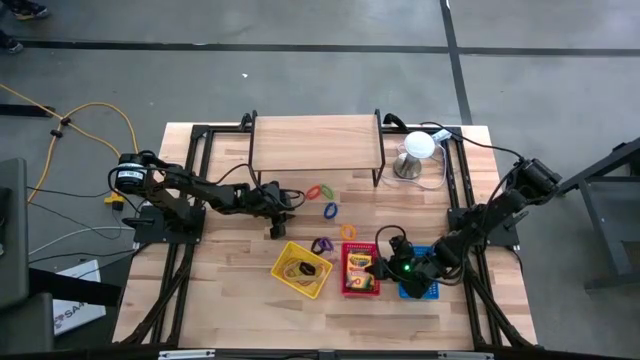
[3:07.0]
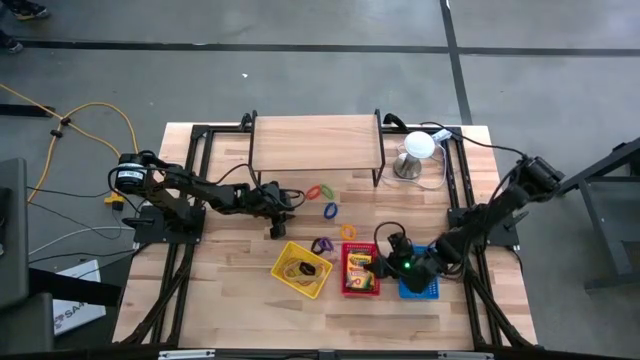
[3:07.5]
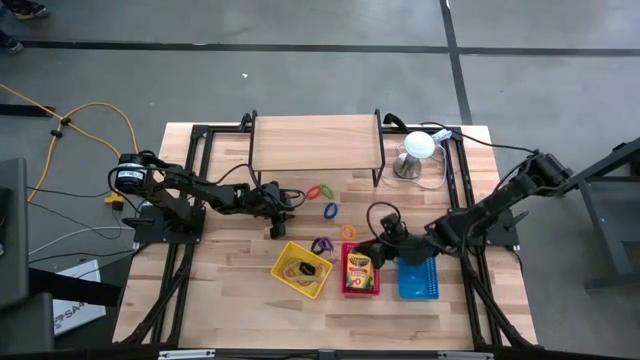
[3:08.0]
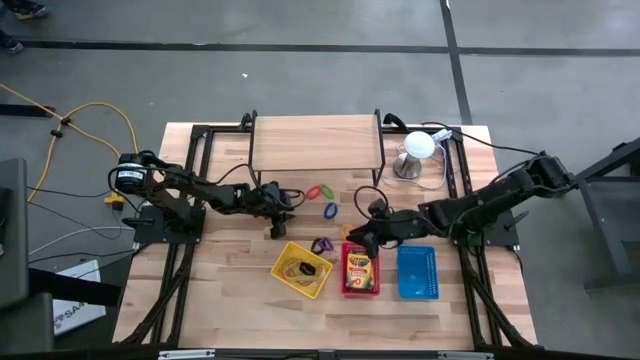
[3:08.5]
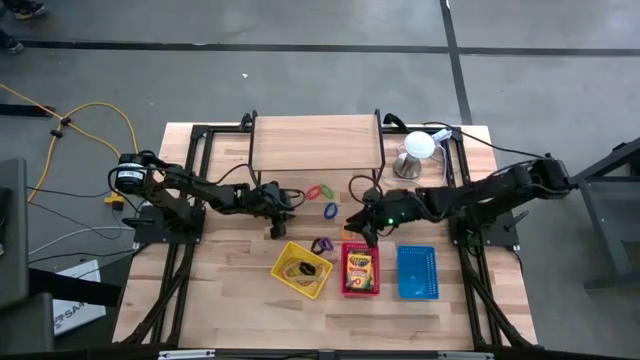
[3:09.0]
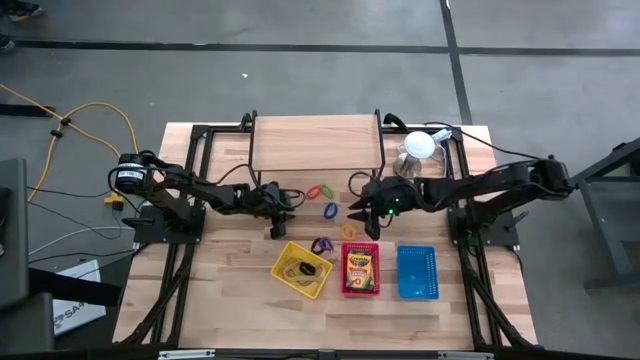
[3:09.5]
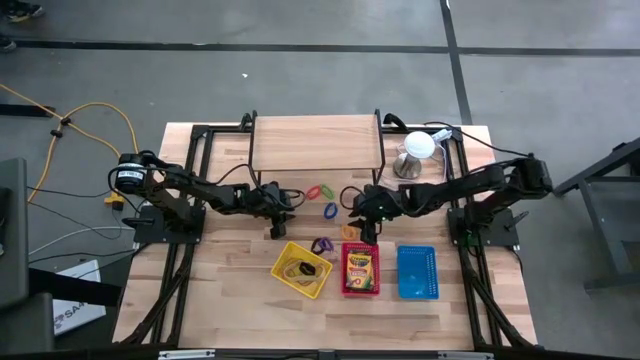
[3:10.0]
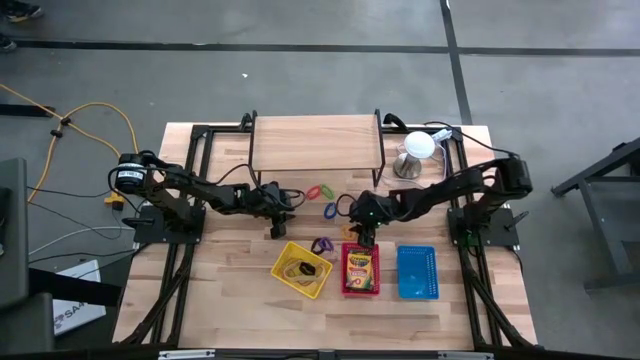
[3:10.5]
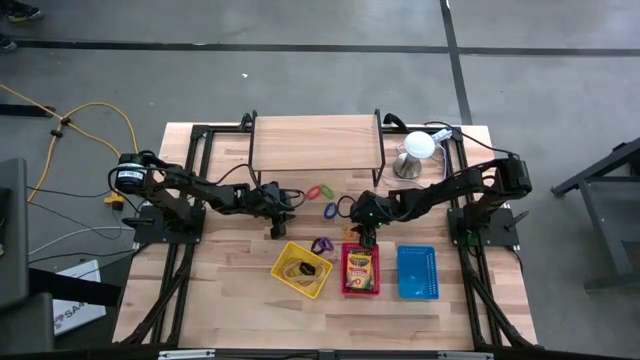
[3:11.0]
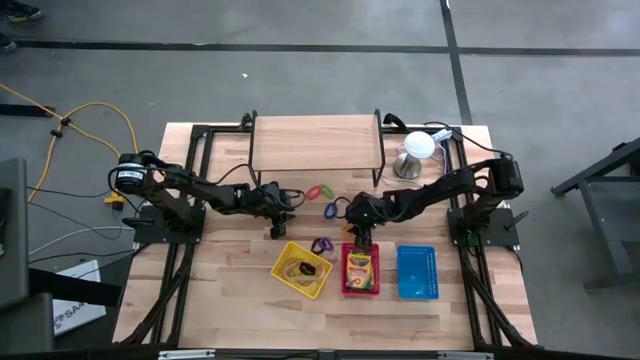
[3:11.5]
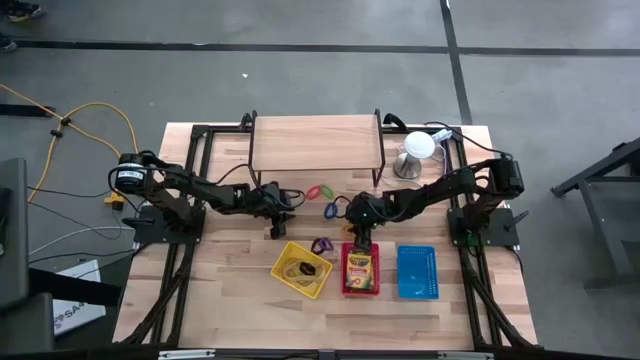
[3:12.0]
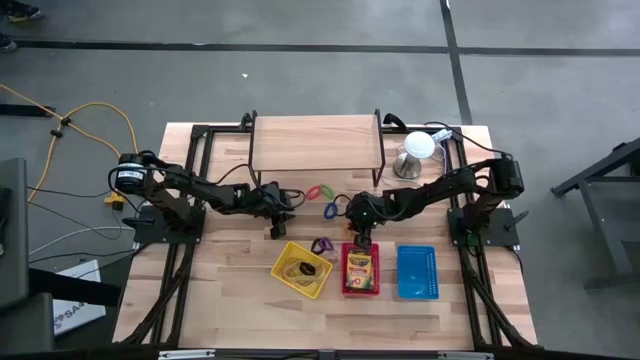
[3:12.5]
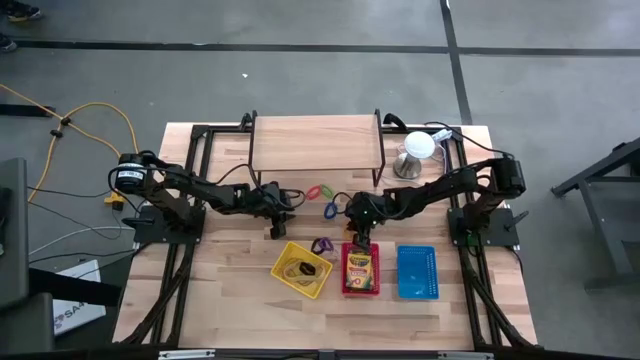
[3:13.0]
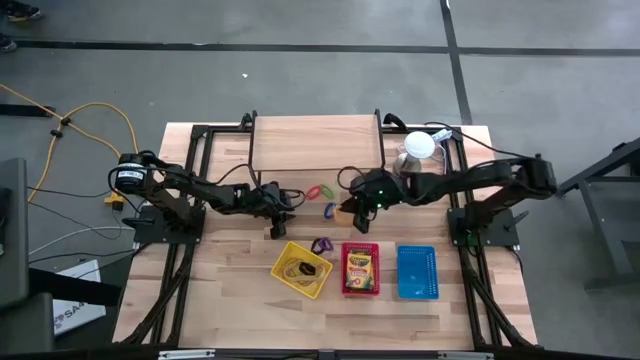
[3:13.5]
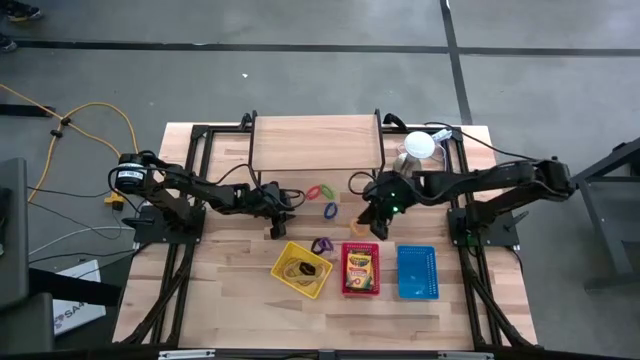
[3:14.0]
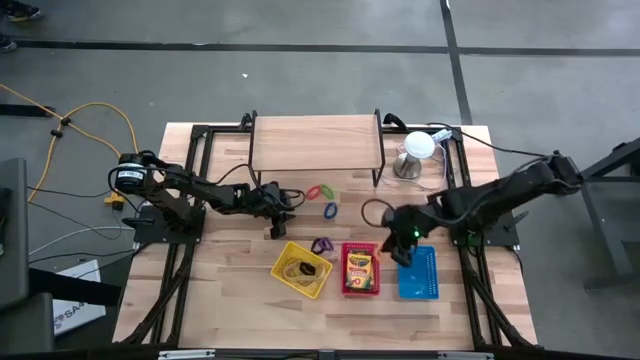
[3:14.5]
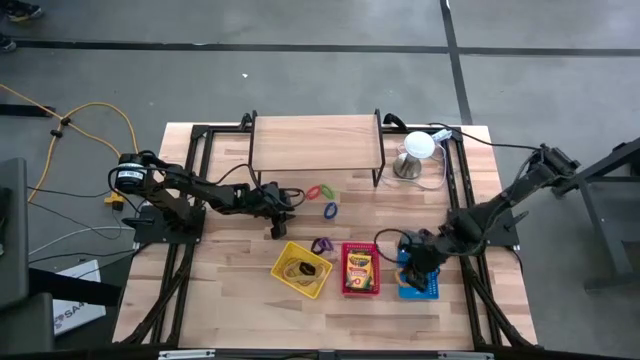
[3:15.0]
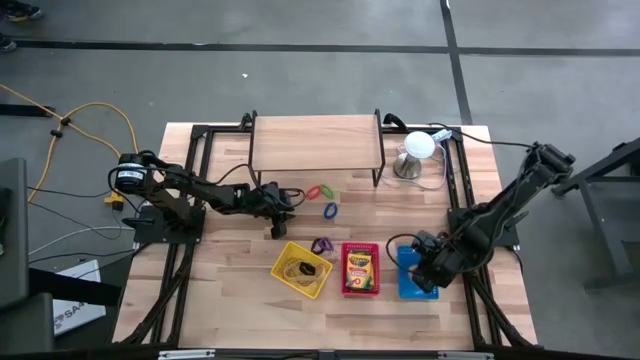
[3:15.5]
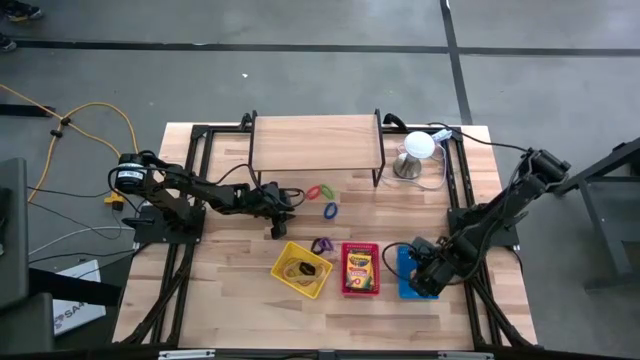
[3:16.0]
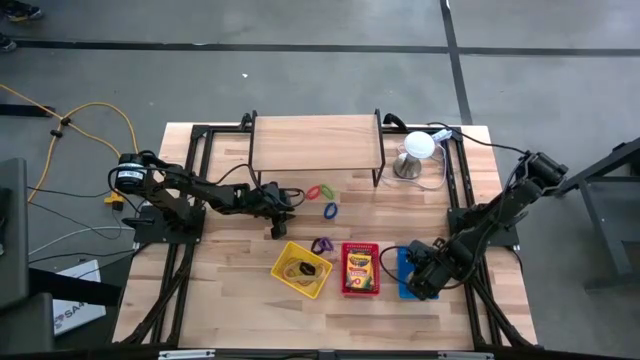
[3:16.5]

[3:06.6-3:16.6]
Task: Pick & Place Office Desk Supplies
Put the yellow spring keychain into the blue bin

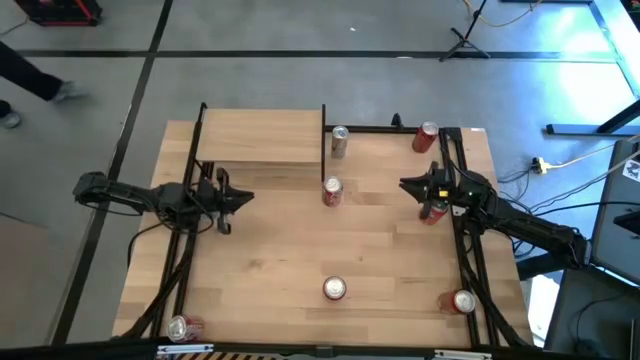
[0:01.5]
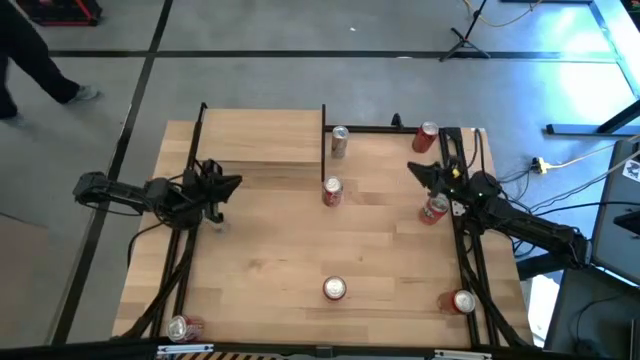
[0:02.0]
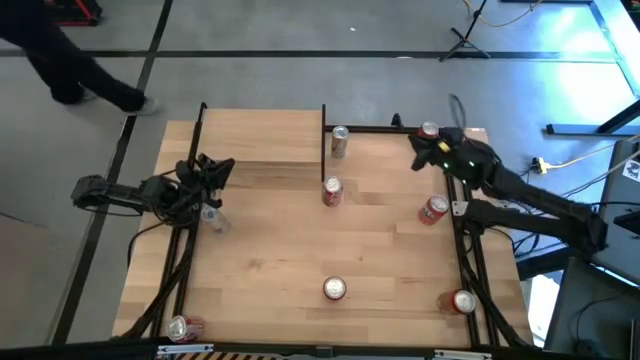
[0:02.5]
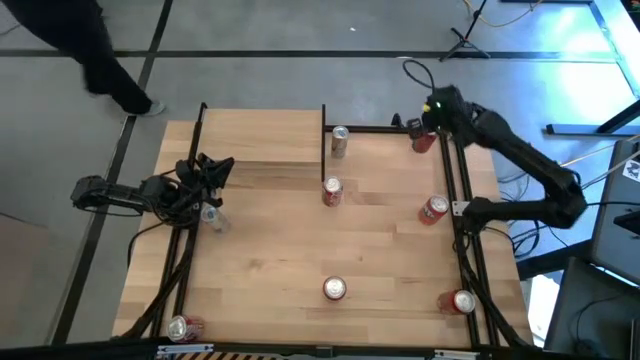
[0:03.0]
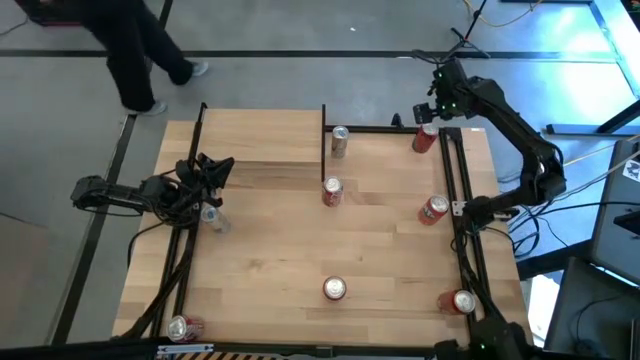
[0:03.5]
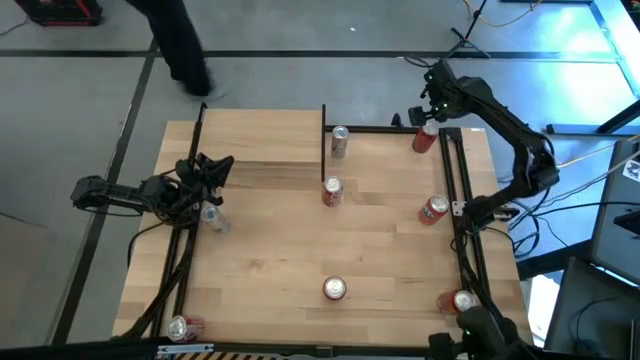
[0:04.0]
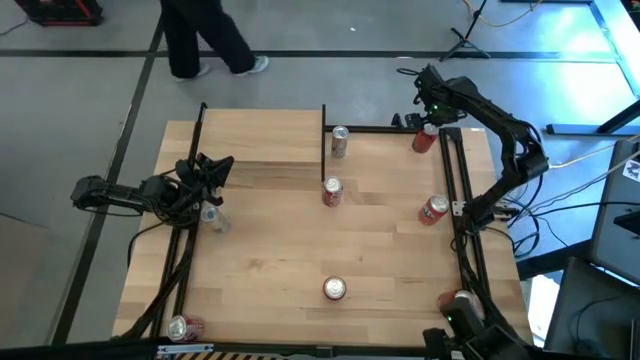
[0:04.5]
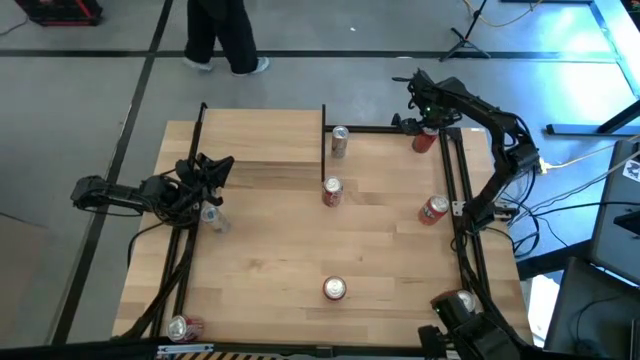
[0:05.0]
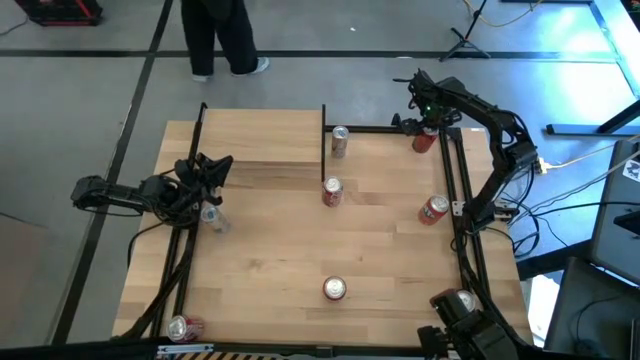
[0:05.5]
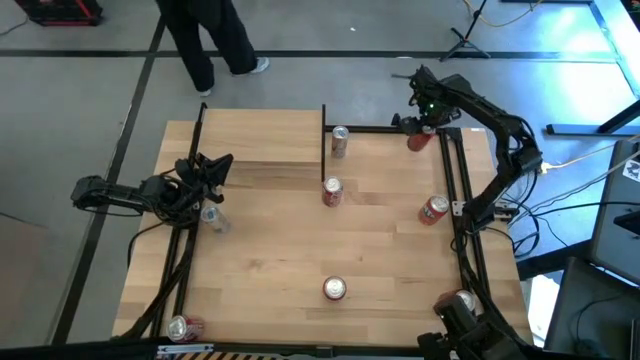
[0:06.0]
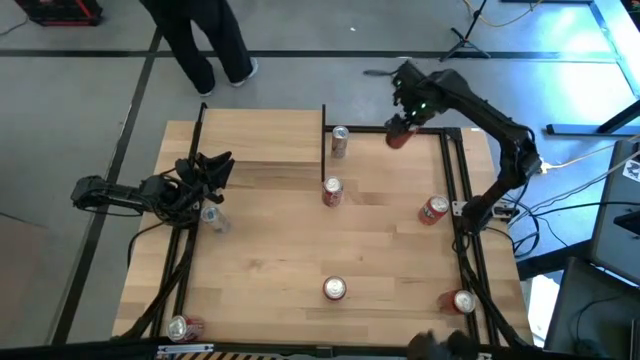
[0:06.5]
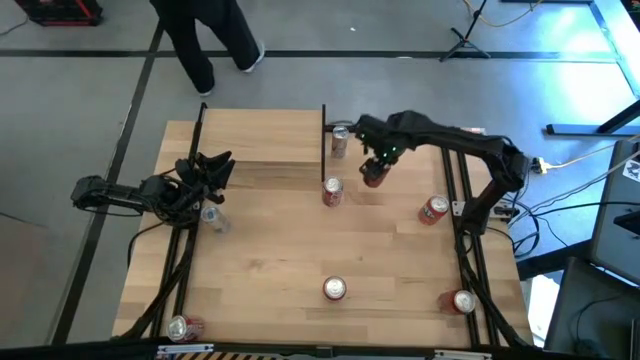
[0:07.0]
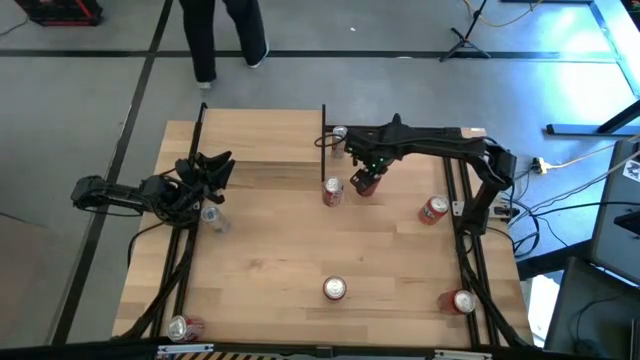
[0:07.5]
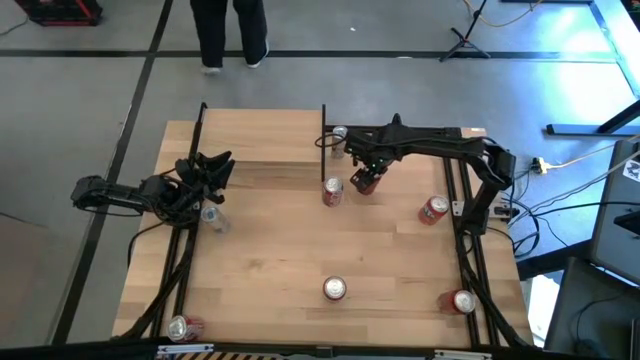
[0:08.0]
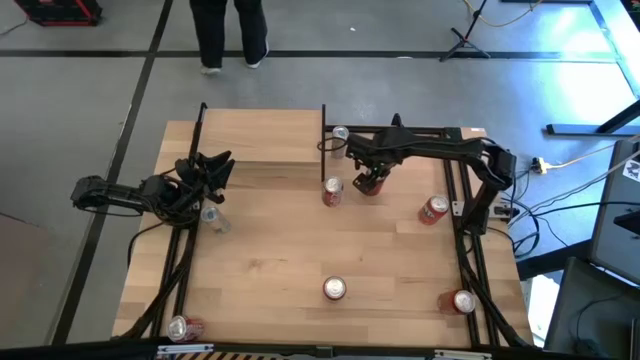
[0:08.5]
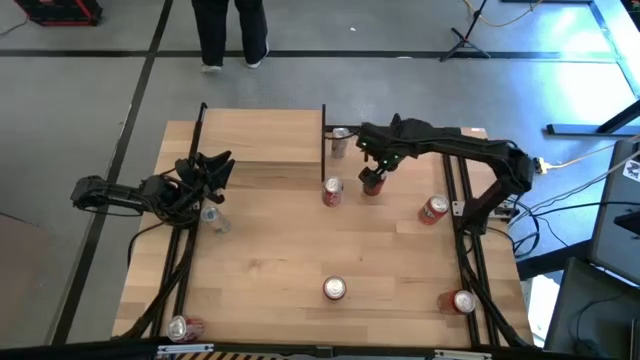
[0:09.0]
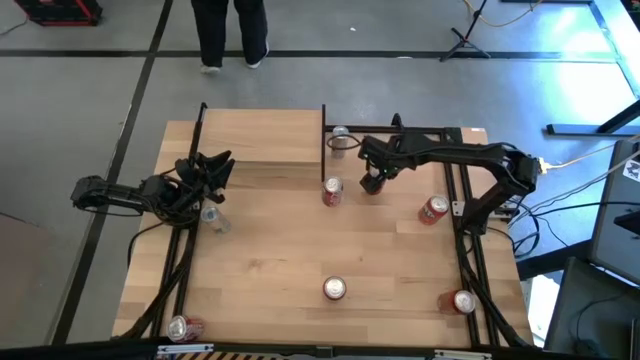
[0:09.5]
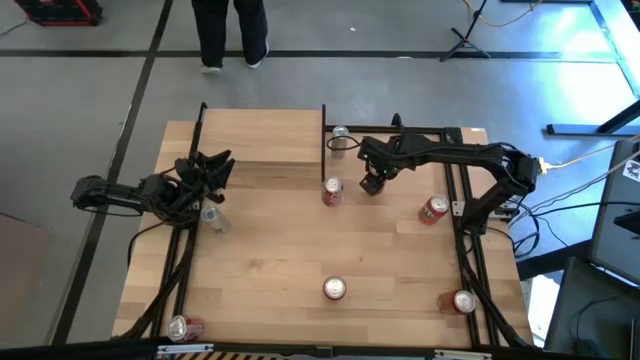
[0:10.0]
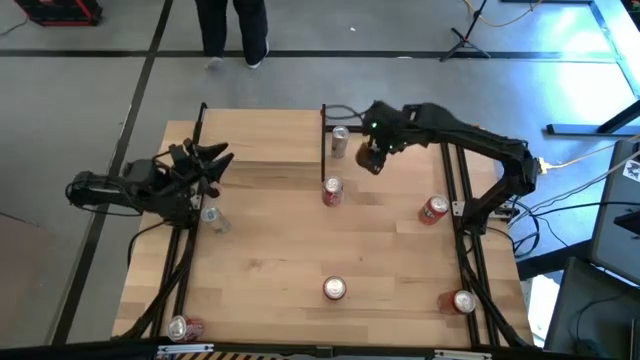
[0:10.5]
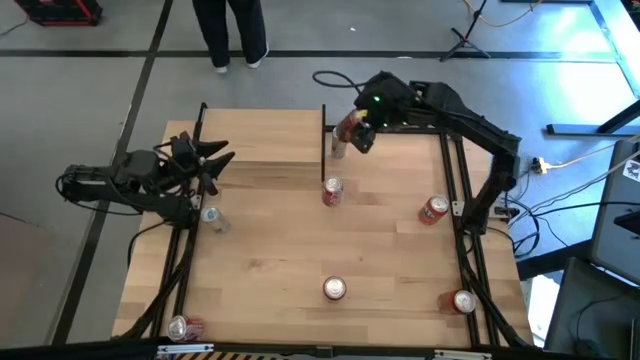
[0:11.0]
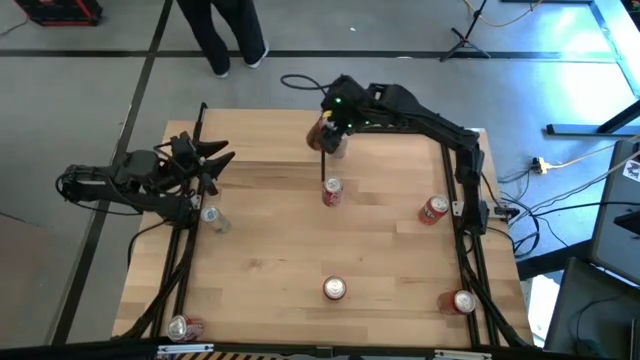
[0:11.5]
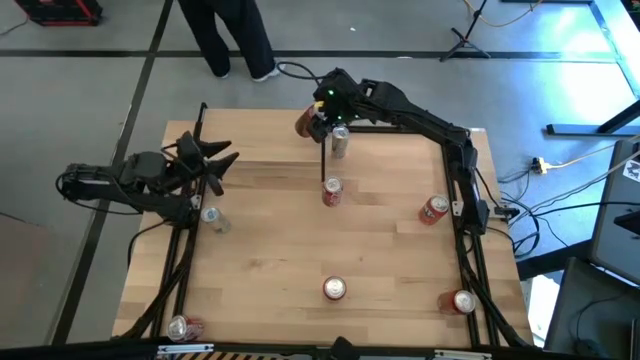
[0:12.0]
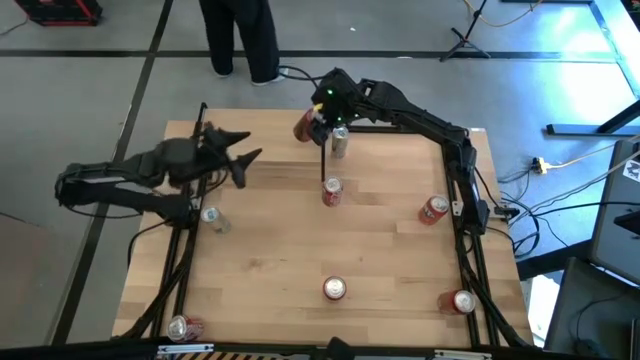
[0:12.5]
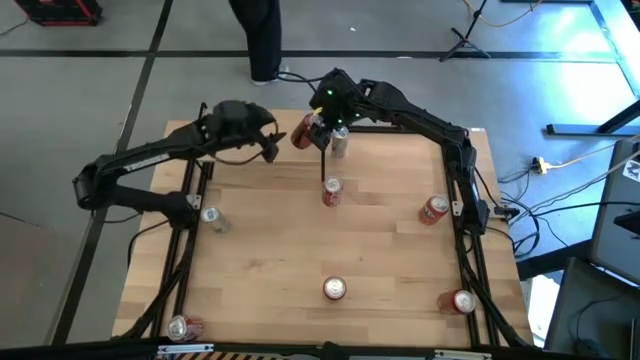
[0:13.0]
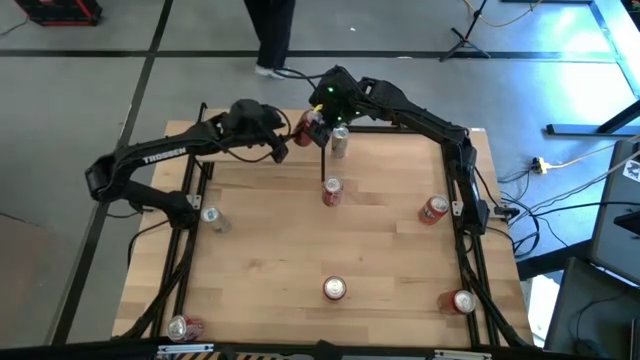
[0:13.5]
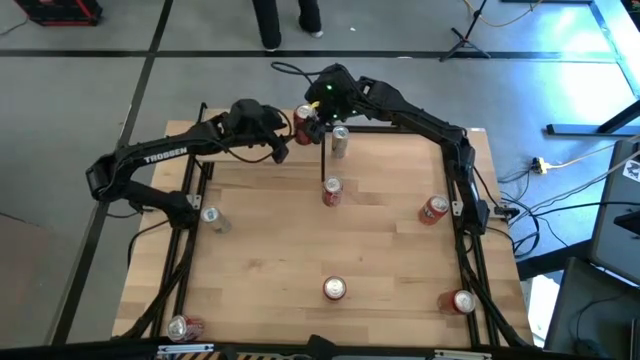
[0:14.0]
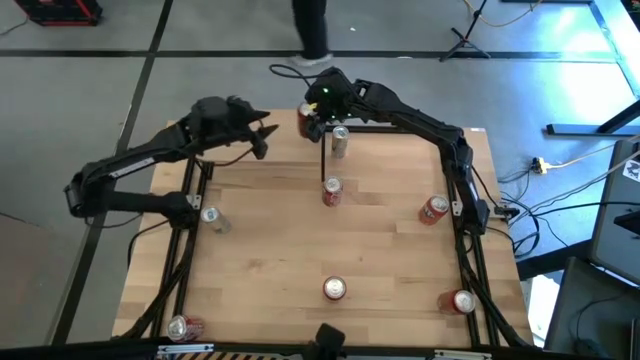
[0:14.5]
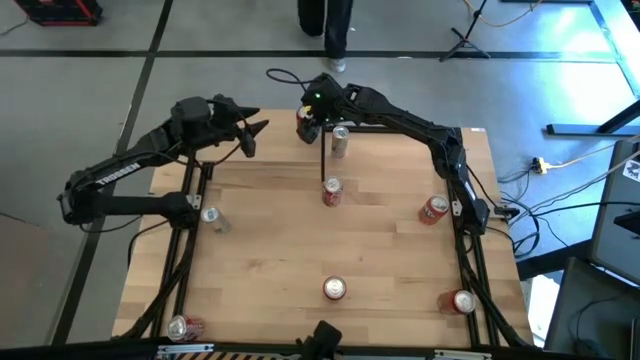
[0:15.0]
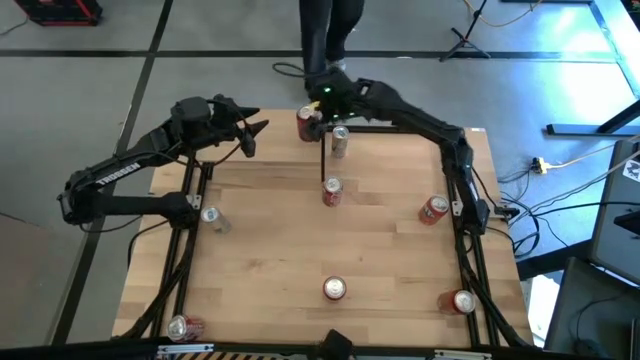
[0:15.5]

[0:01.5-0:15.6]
Task: Place canned beverage on shelf
Put the top red-black soda can on the shelf
